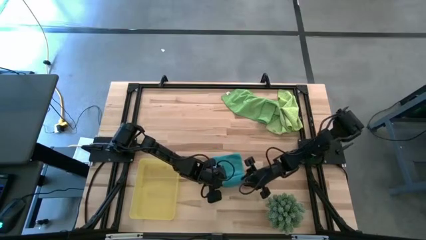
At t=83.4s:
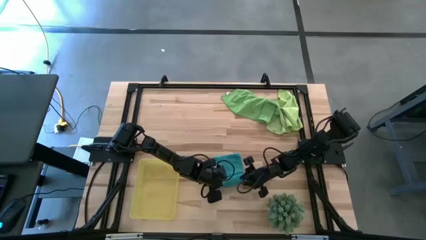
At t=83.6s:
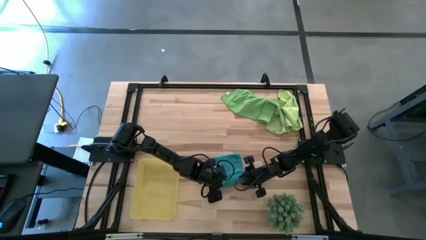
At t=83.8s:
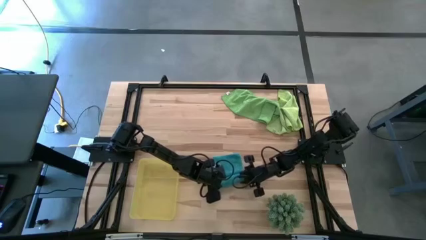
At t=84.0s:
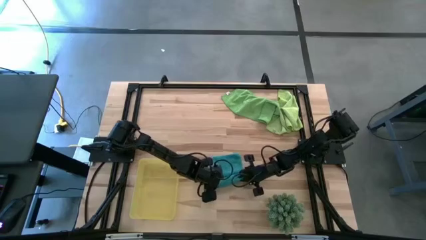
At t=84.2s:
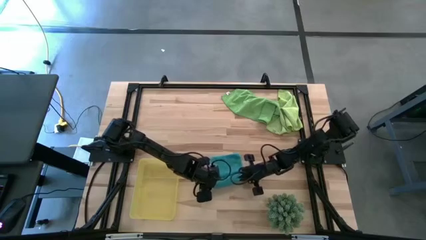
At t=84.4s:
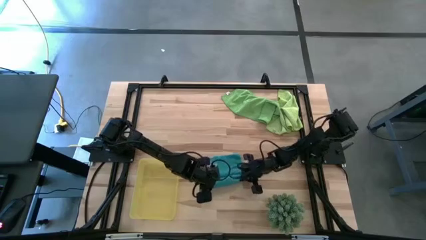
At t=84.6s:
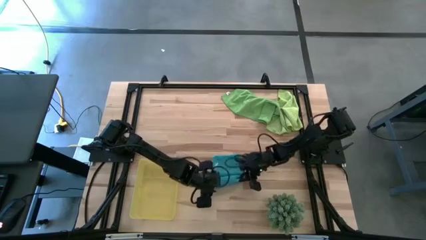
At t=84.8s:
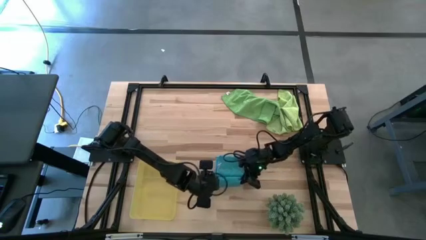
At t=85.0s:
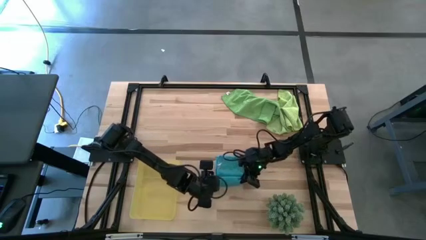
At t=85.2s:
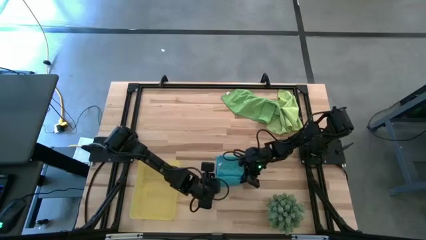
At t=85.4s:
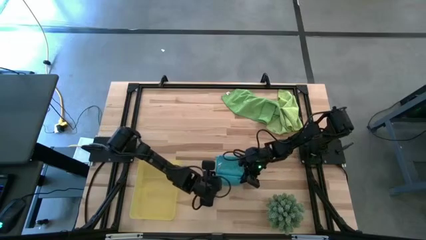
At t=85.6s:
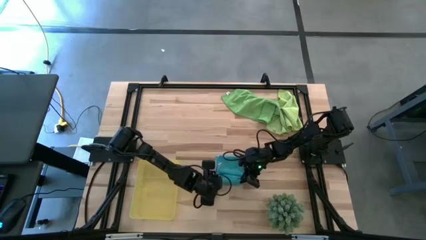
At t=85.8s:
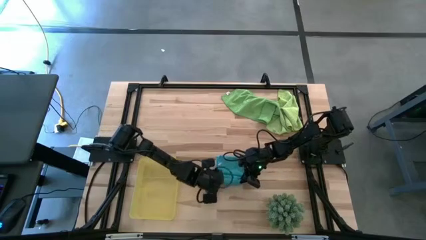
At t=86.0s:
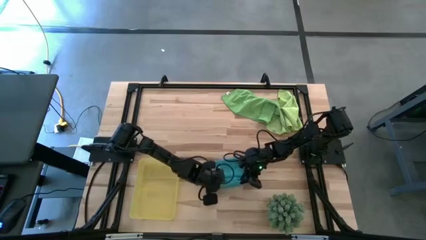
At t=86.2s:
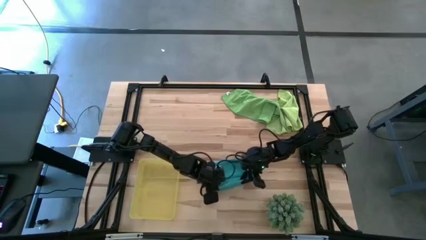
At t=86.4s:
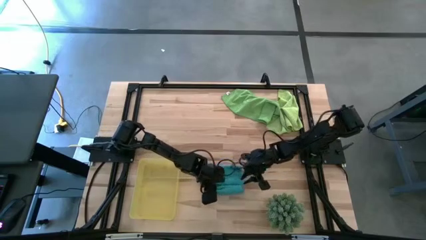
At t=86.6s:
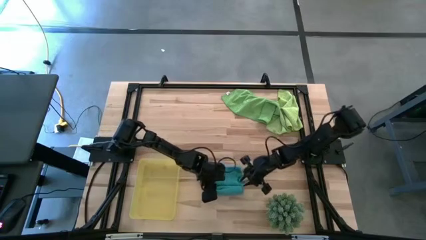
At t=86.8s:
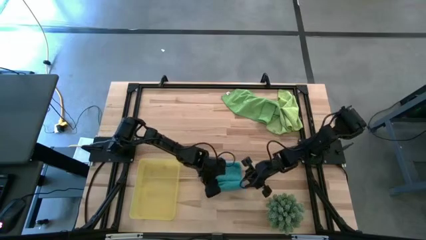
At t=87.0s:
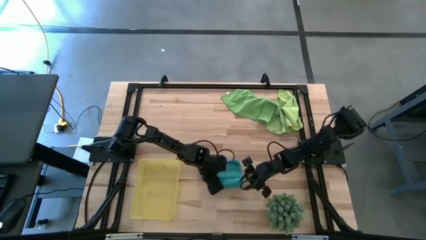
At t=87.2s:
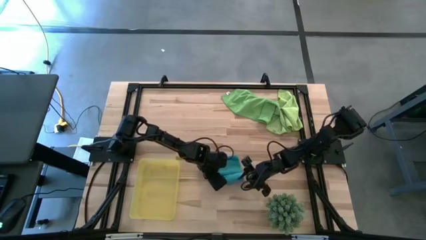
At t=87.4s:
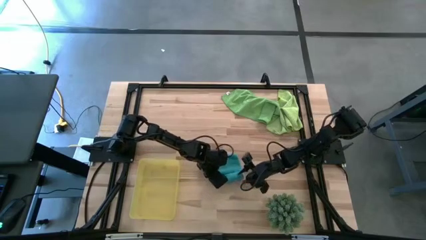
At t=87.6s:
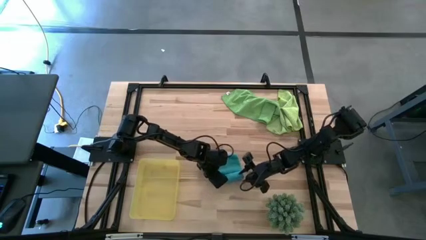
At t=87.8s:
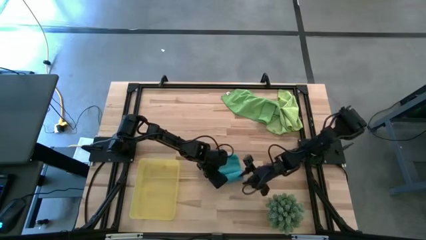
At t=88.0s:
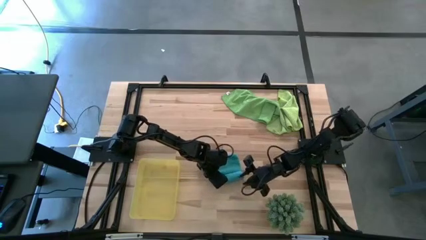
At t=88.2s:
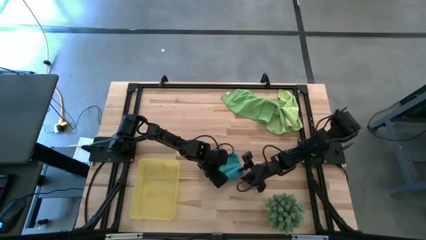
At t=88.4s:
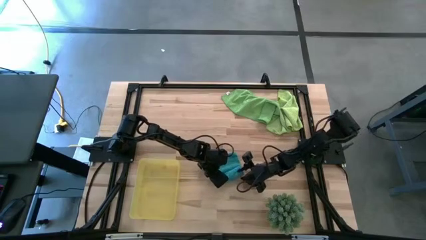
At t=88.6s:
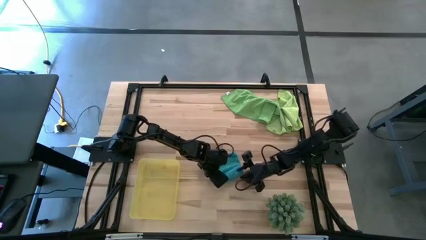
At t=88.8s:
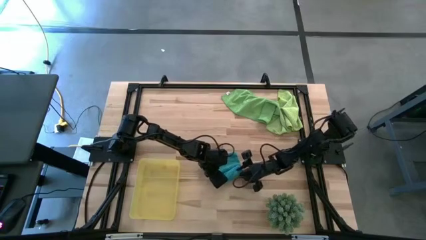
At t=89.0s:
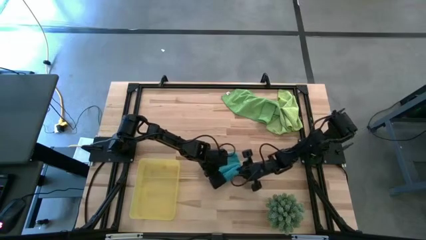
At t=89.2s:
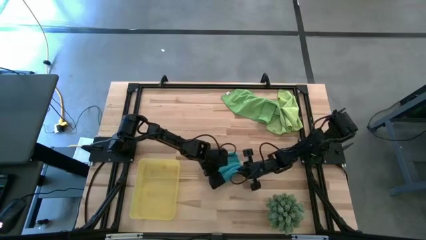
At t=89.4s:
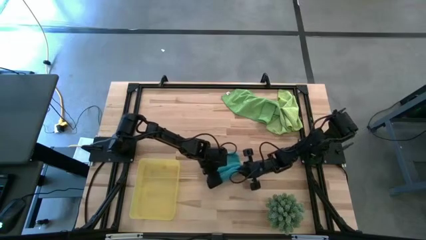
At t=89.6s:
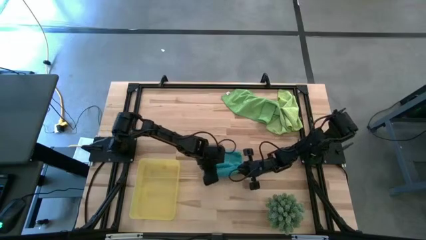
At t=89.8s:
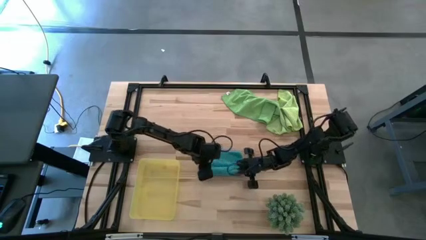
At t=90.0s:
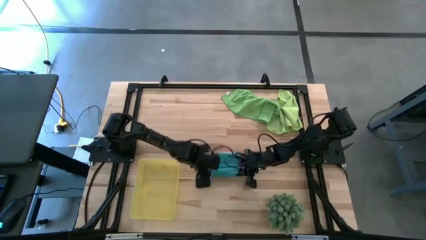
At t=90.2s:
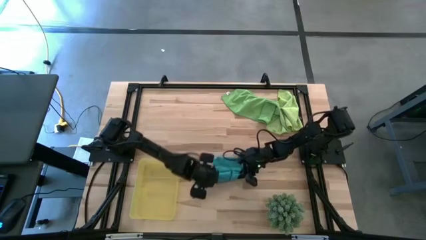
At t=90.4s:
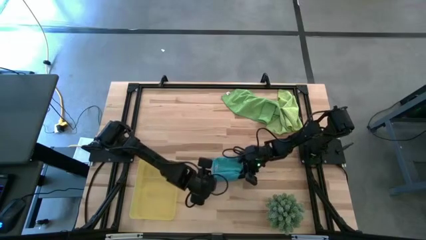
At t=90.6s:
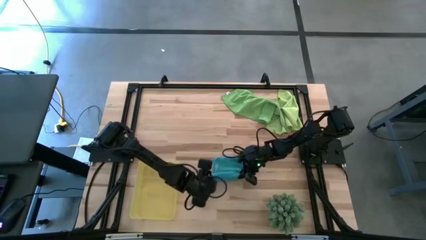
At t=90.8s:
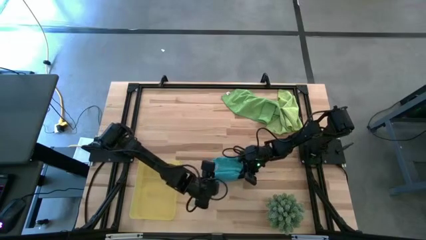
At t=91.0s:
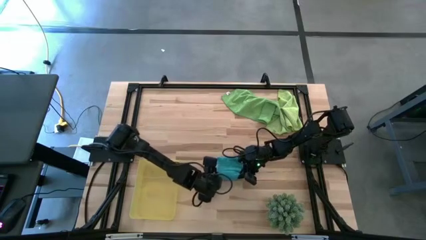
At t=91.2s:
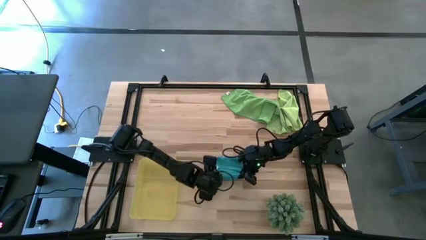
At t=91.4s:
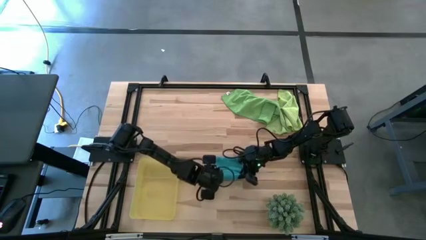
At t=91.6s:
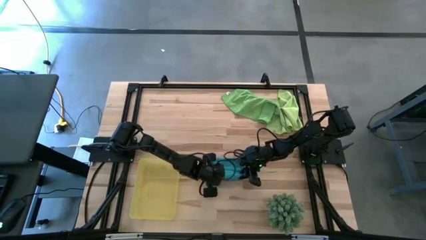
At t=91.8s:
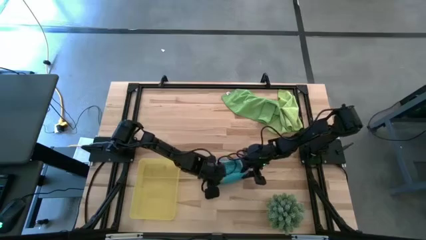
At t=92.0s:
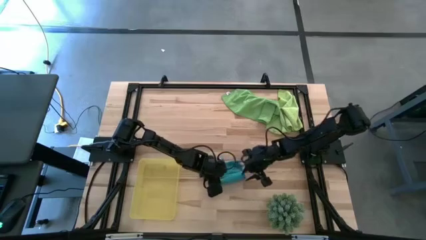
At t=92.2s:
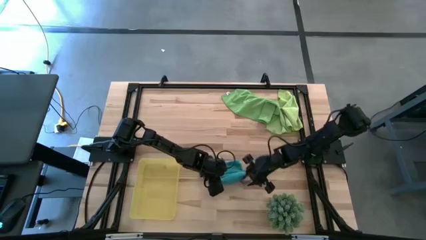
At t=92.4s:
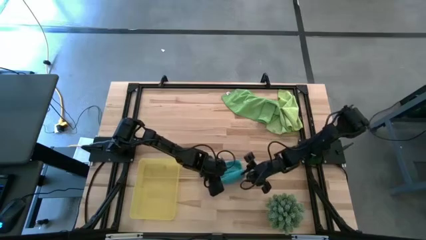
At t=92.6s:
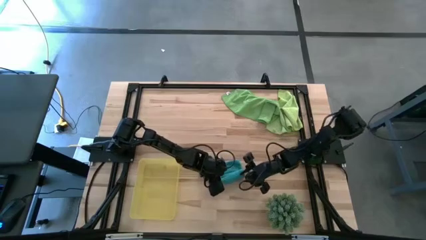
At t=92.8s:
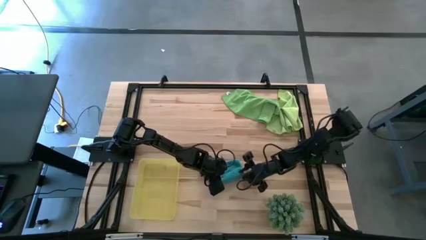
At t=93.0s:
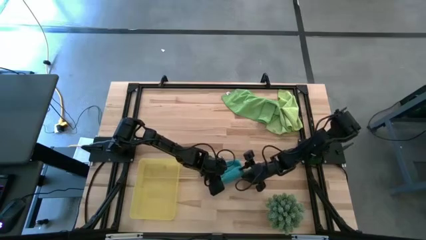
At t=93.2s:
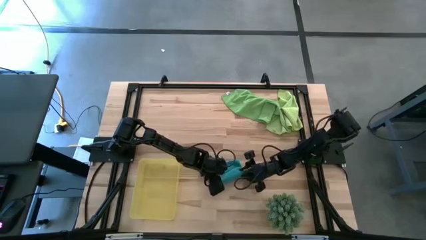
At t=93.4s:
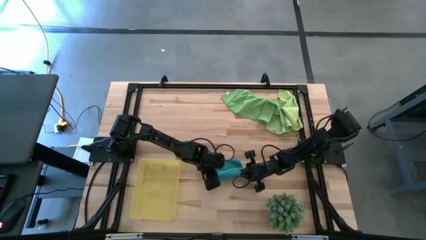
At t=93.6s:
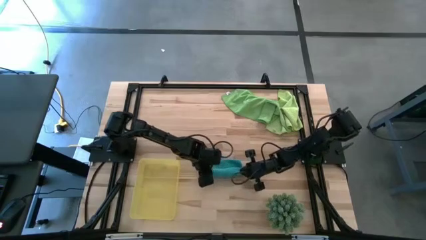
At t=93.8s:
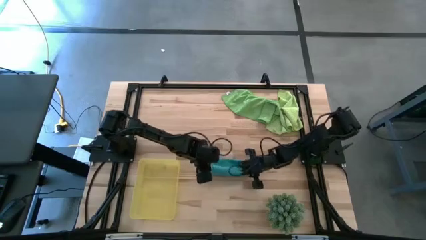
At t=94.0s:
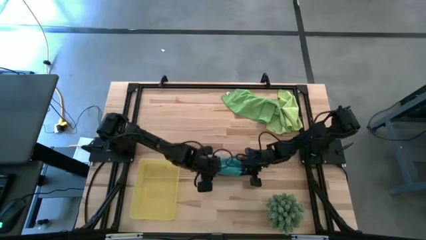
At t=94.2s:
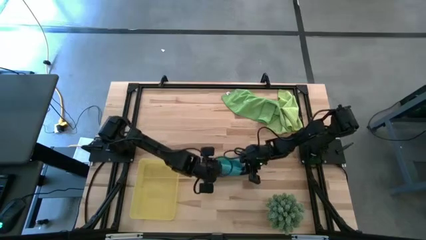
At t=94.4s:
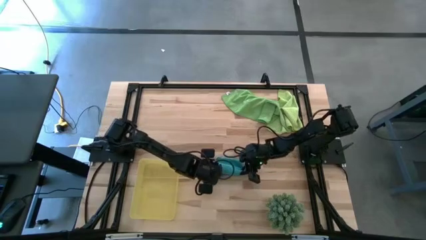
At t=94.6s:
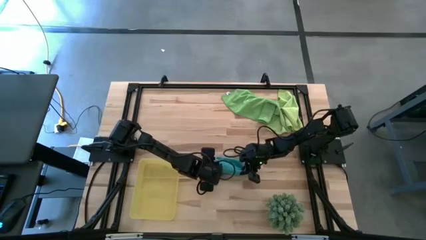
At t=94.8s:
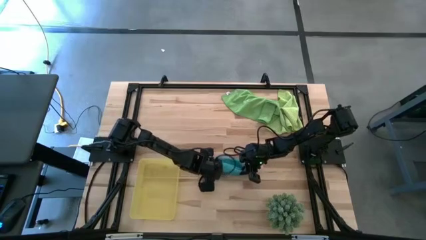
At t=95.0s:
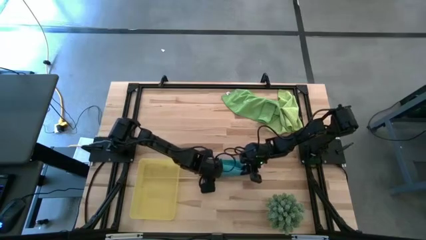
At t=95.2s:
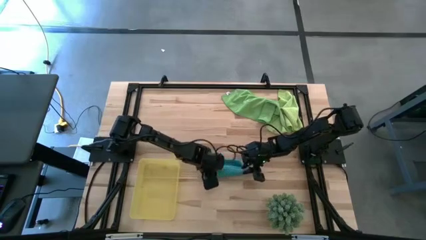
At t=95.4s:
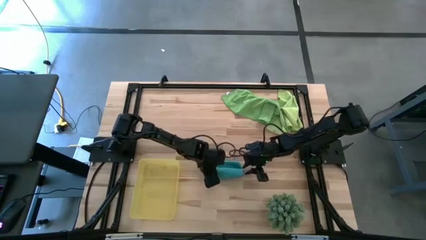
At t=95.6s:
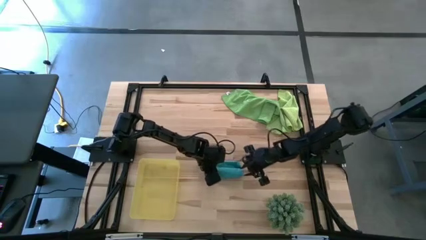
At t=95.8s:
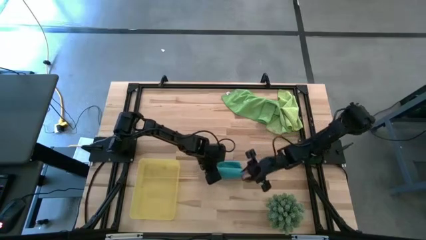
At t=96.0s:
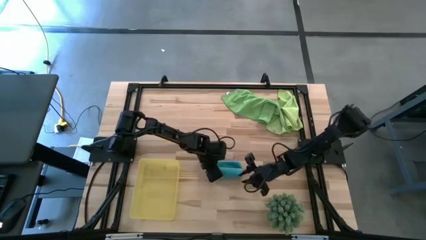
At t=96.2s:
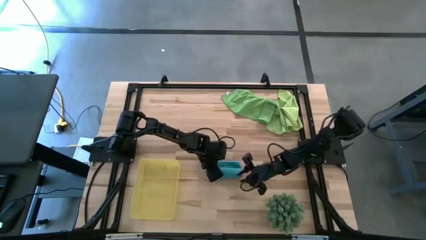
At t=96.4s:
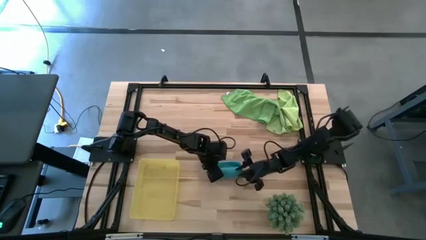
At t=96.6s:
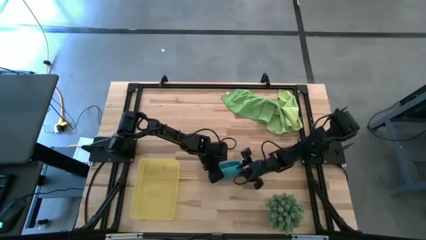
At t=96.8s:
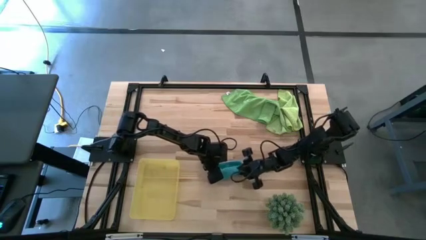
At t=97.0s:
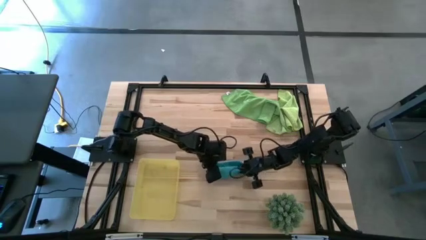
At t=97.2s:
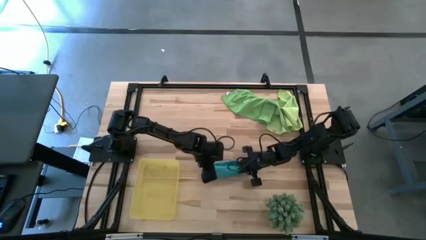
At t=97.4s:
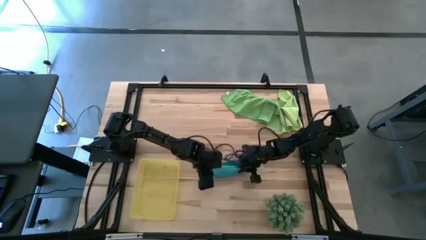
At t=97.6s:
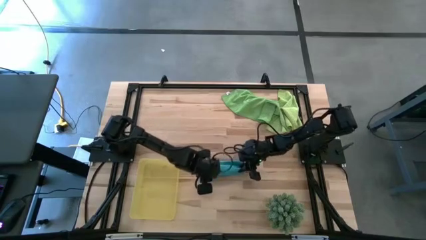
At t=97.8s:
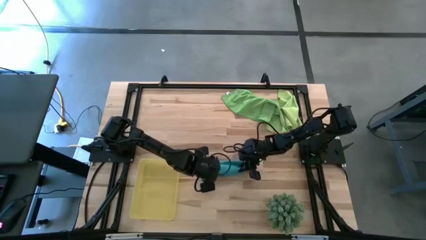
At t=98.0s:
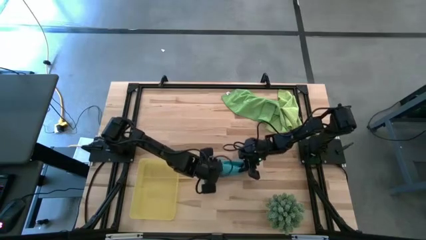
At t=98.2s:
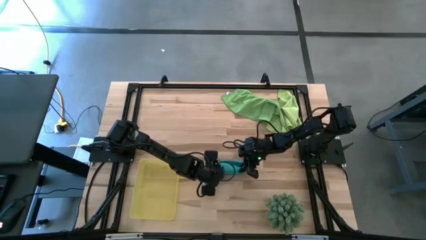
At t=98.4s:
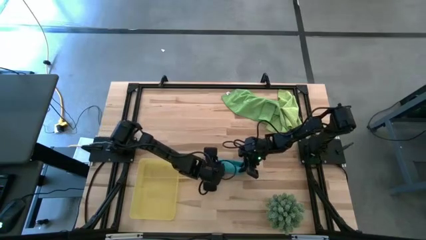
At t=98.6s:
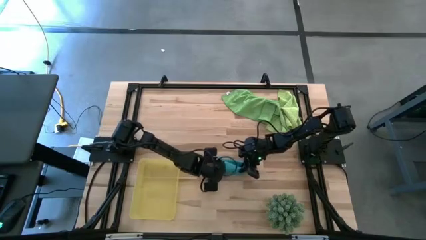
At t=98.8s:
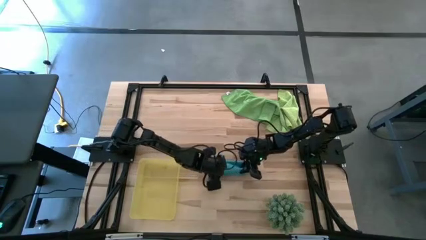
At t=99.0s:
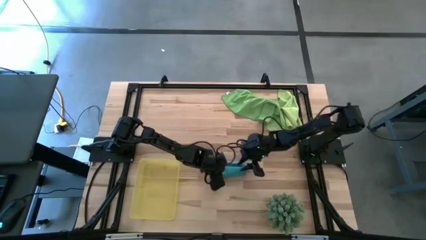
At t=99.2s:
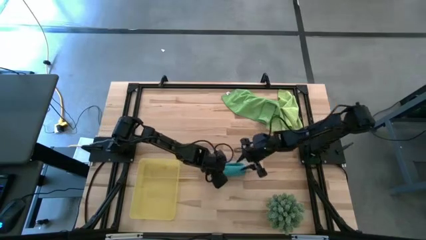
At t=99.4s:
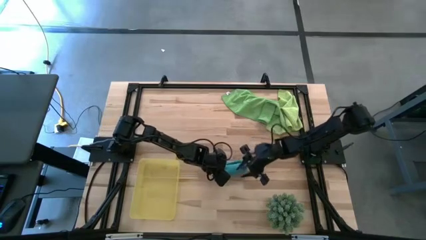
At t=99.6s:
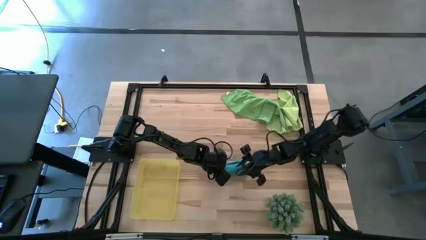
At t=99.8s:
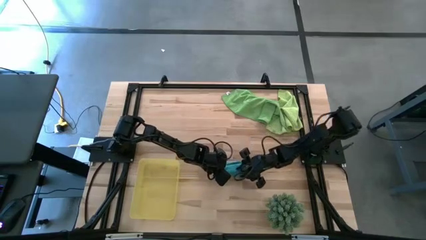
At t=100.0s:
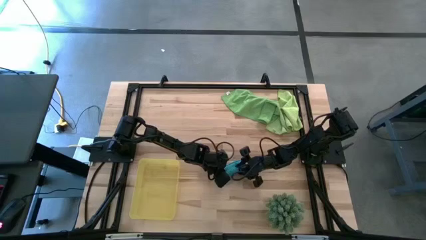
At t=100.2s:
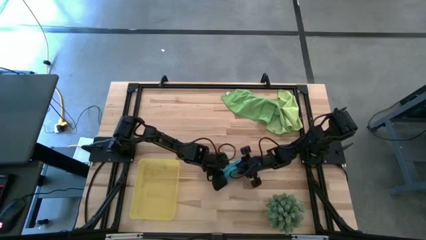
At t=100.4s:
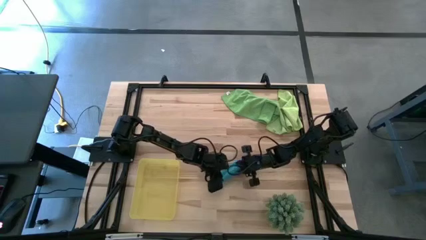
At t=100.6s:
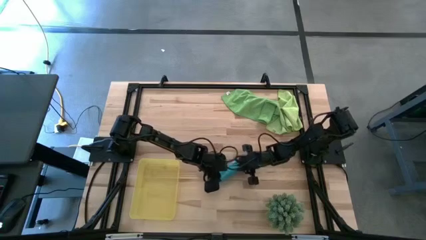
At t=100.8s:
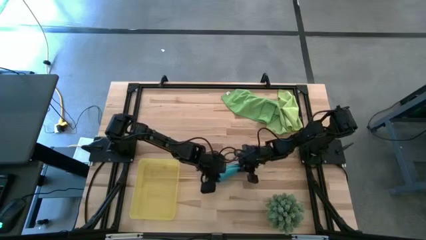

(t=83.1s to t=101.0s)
Task: Roll microfiber towels into tight, uniform cylinder then place into a basket
Roll the blue microfiber towel
